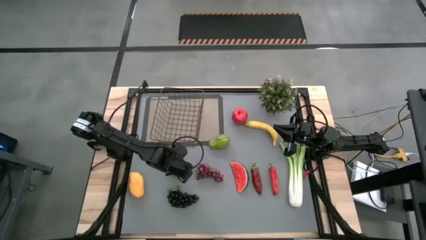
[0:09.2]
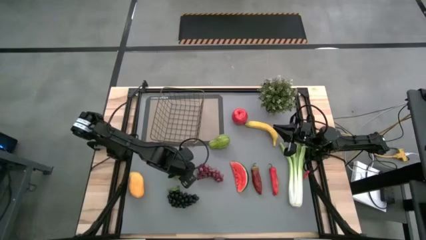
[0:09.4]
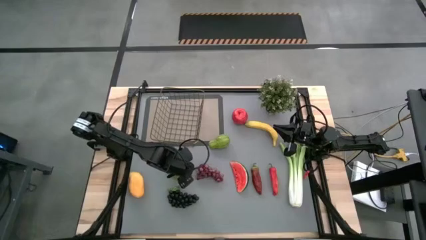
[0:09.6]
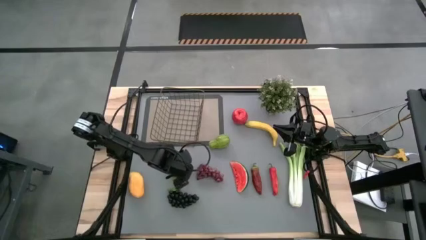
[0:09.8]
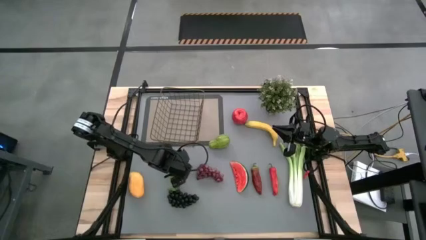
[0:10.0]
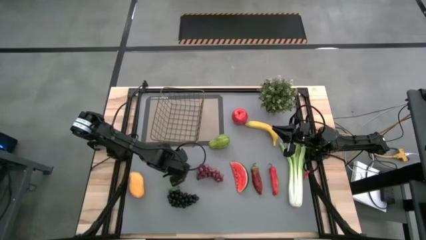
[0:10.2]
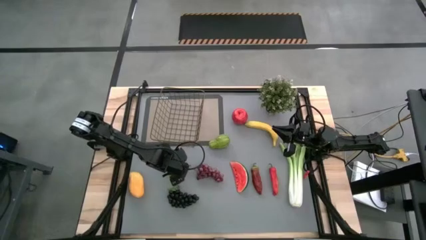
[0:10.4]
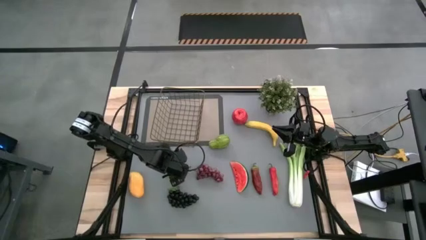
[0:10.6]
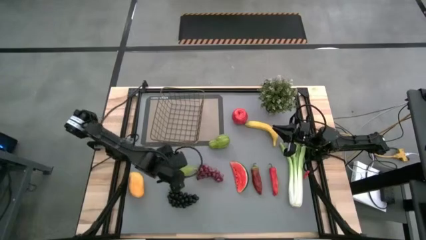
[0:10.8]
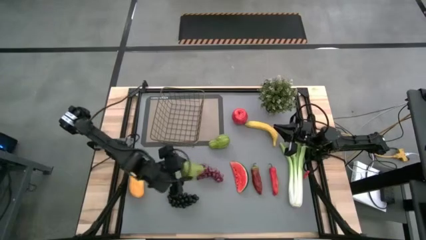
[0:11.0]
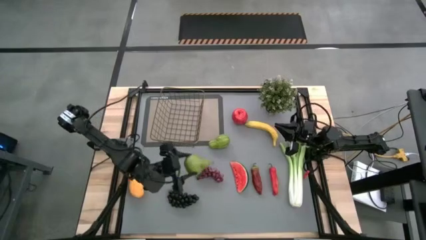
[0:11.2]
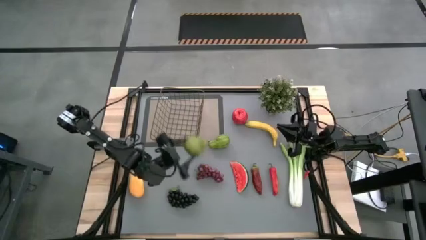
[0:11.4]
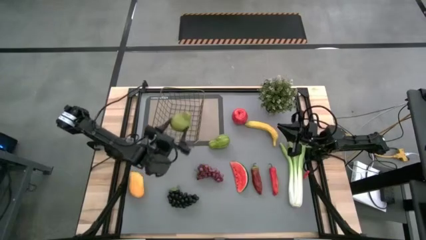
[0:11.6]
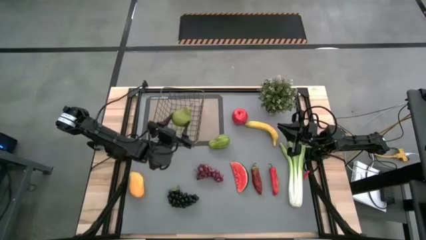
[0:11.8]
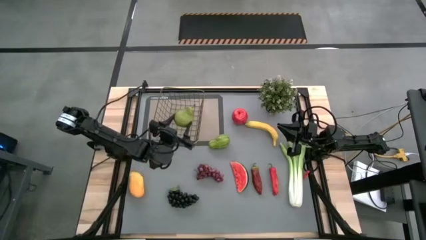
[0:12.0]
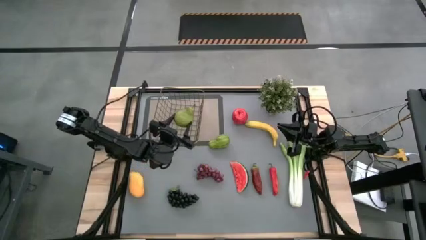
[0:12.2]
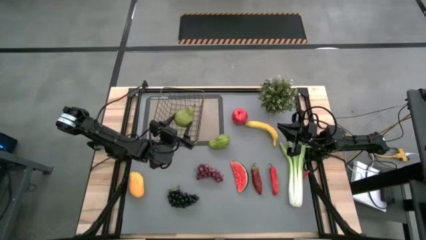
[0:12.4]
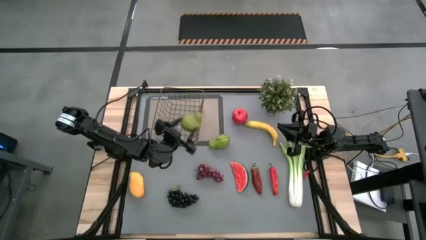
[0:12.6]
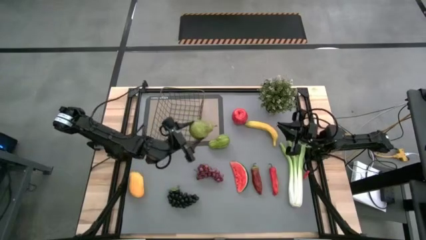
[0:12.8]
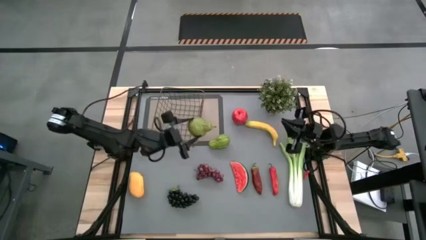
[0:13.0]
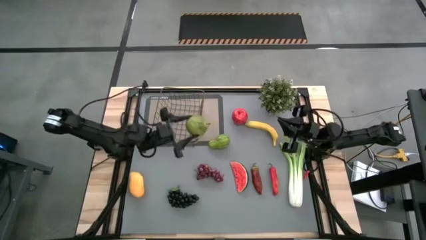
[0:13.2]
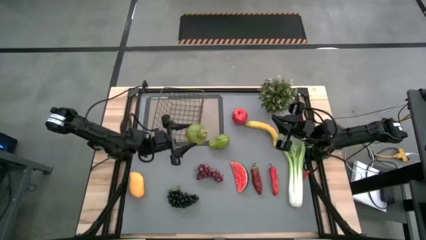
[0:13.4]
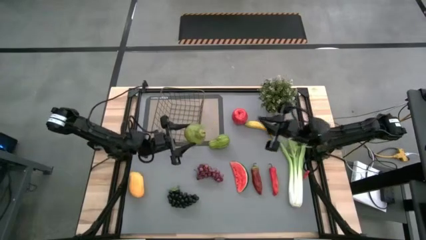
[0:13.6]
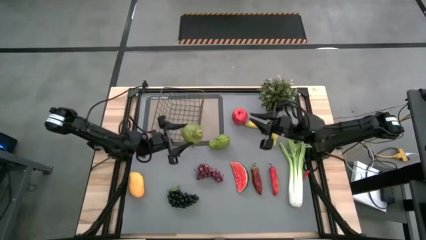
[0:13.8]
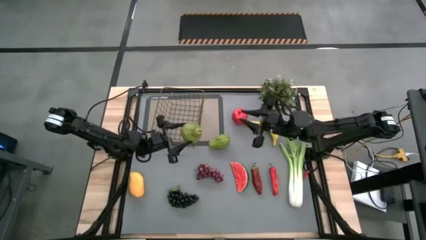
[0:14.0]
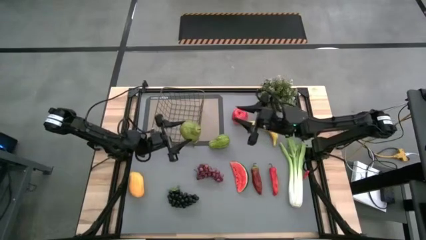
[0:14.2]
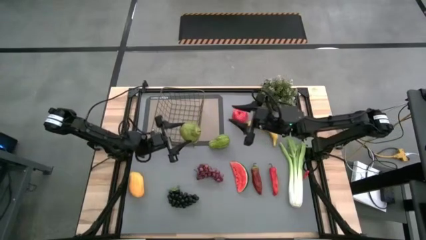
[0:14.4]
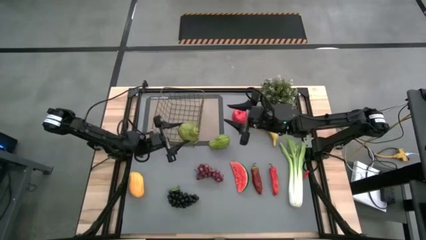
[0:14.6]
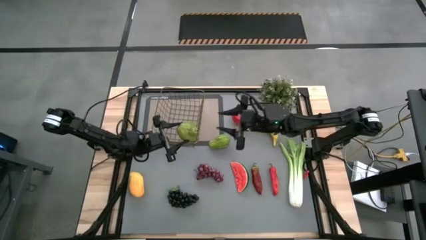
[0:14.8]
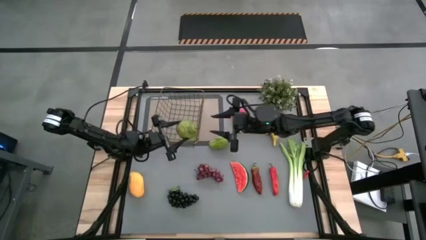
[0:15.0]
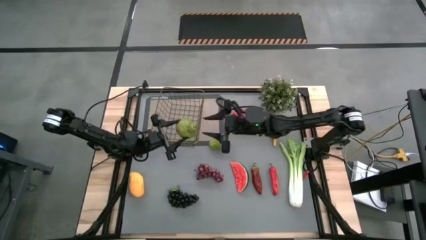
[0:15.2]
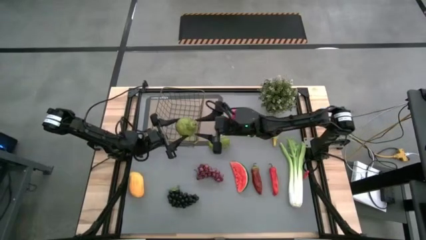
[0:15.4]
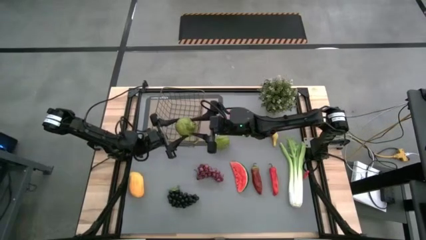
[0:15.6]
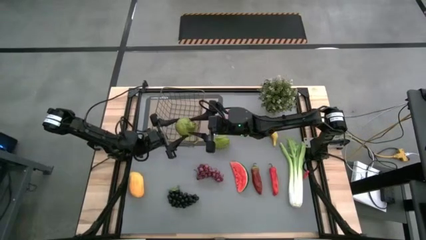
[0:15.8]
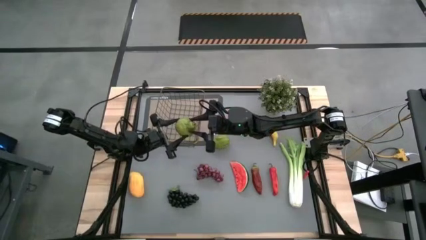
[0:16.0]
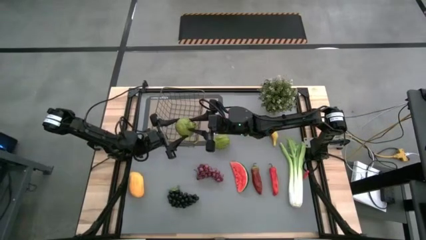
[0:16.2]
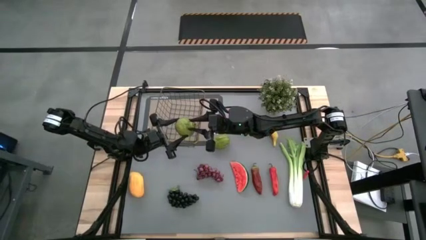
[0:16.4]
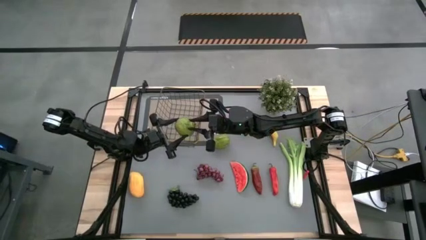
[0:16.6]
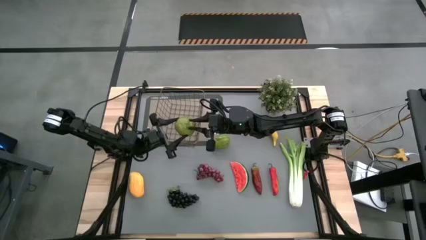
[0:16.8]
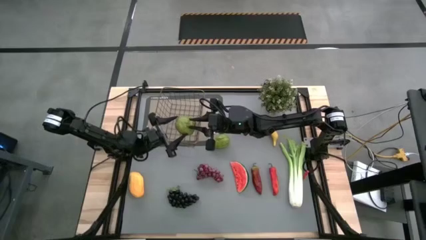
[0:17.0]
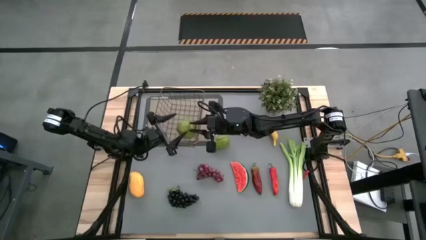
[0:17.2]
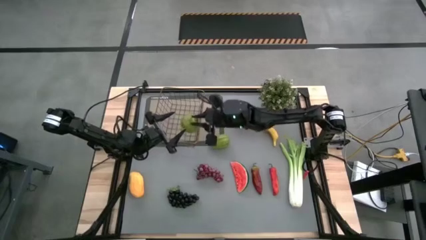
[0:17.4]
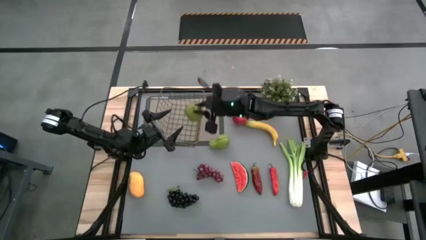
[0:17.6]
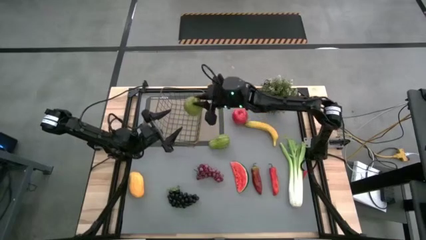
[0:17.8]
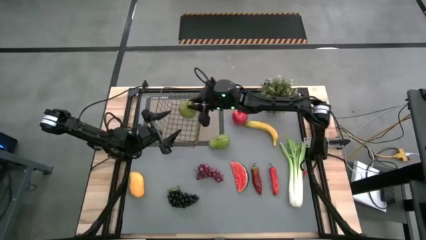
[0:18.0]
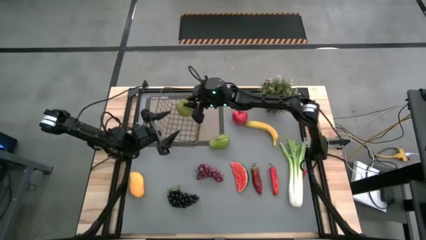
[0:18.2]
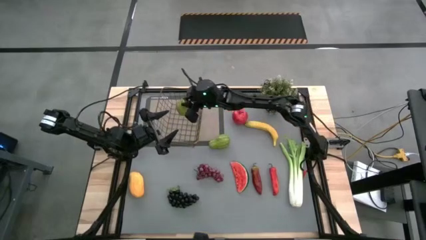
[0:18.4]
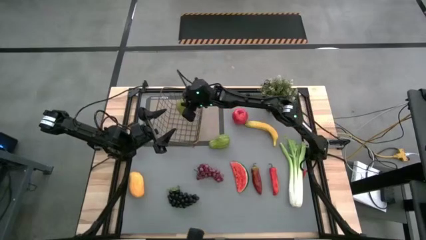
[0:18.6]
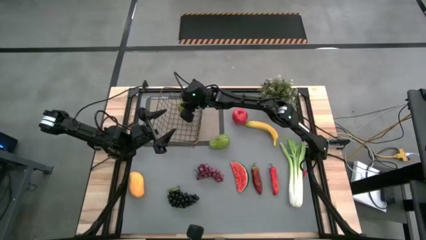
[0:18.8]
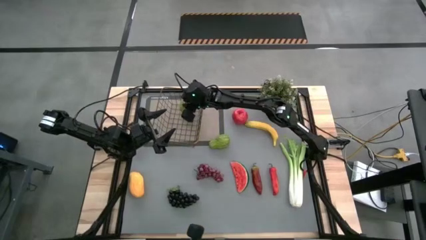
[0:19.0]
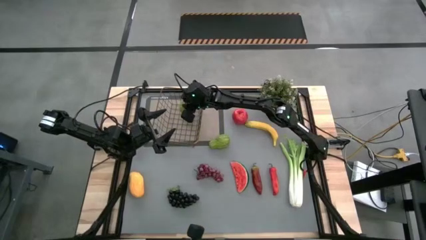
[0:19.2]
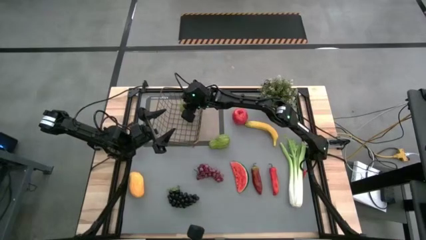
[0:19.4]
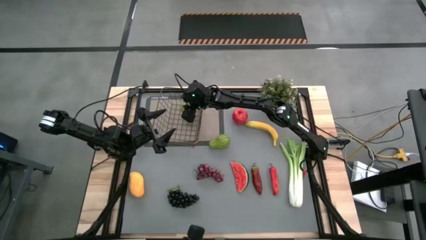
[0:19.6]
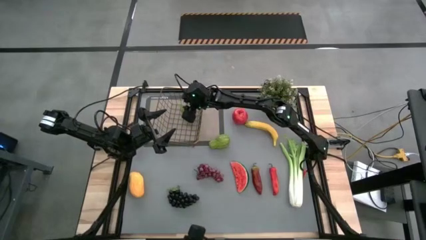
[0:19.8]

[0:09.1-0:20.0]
Task: Build produce basket
Put the pear into the wire basket

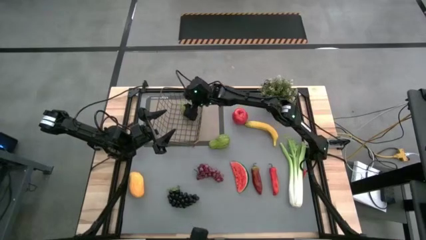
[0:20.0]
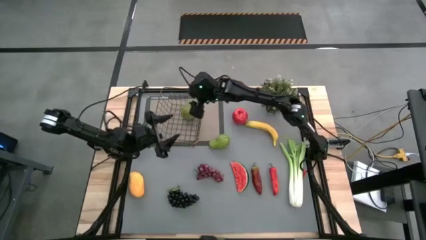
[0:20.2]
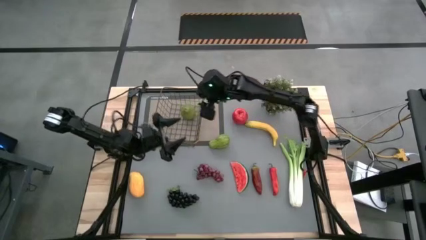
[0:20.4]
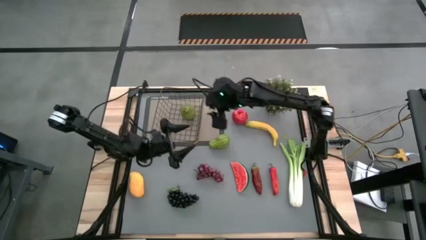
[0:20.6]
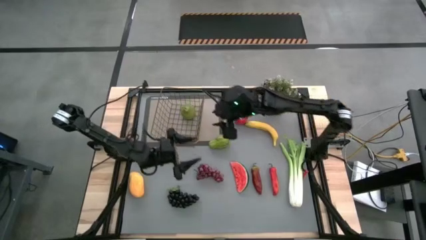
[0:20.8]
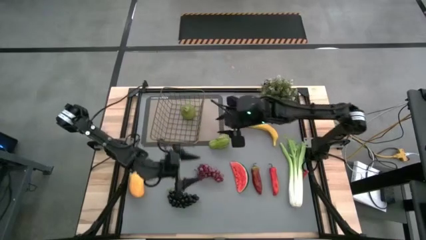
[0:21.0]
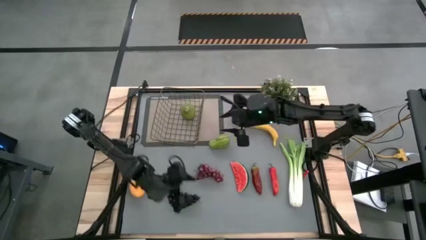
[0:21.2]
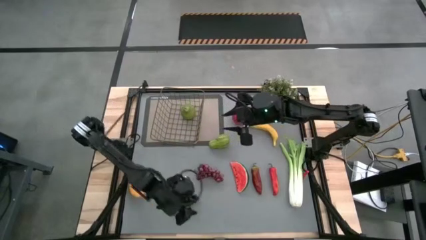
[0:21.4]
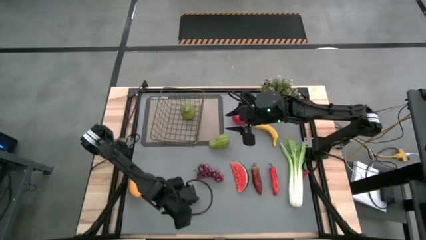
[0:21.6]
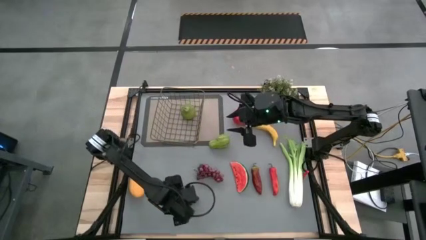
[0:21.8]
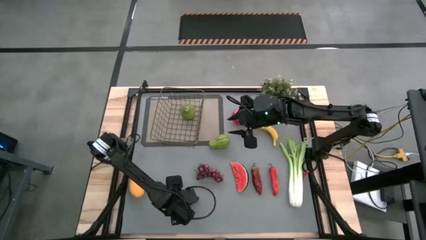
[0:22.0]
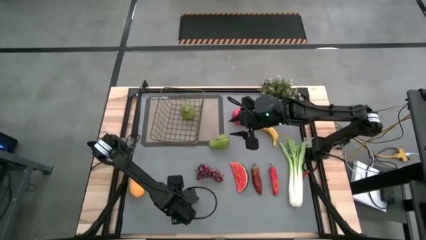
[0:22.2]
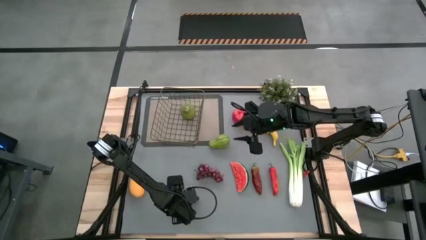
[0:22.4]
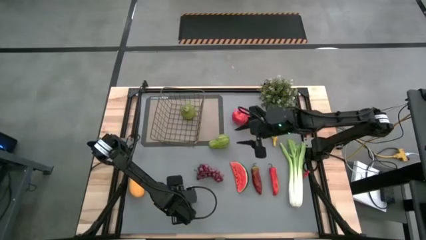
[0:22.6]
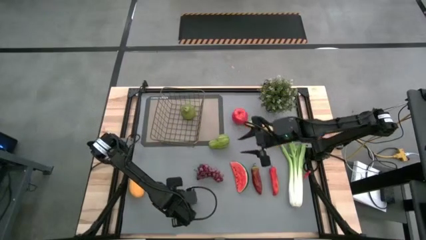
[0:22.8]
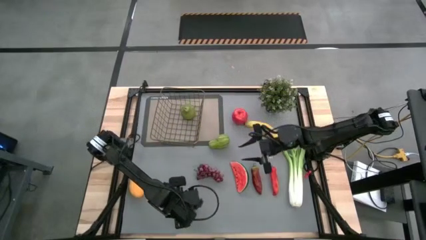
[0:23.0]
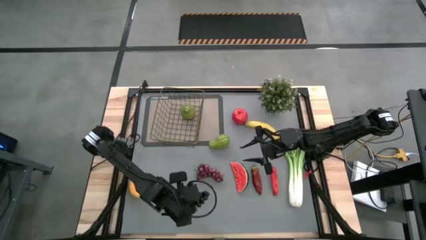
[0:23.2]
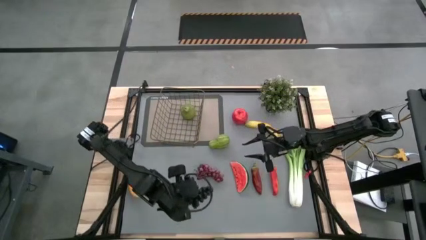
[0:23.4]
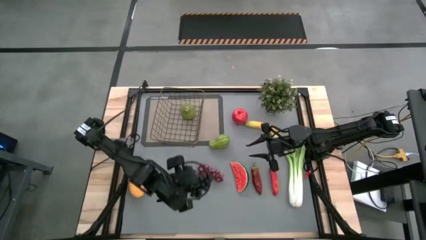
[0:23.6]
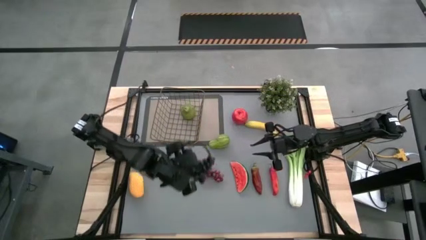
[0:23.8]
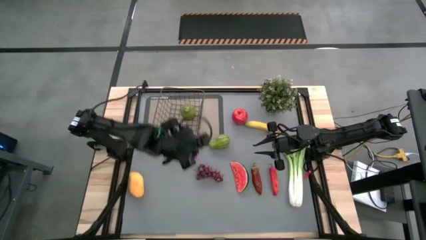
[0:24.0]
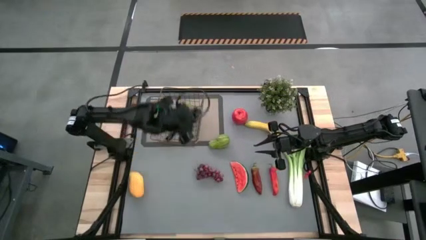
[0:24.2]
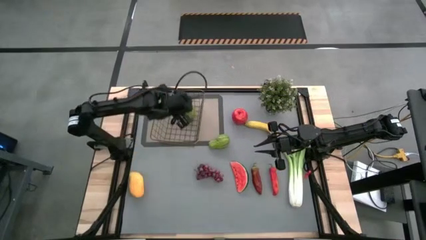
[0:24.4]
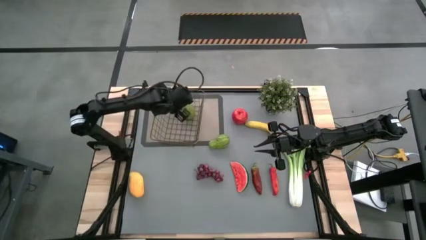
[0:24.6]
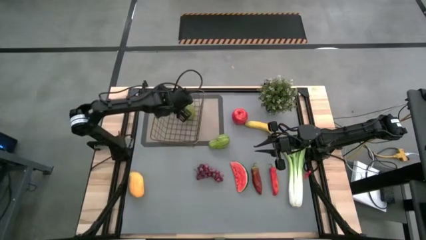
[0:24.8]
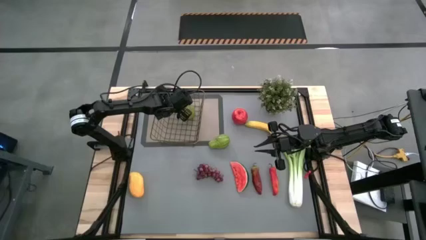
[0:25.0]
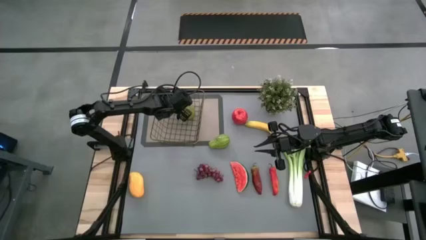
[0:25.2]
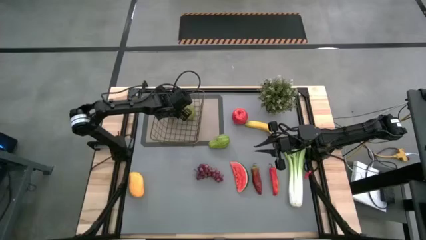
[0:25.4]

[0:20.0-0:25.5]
Put the black grapes into the wire basket
